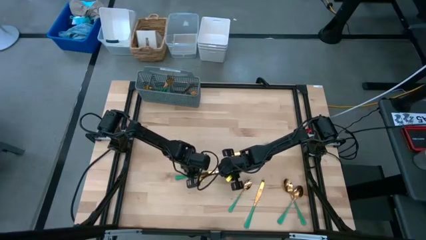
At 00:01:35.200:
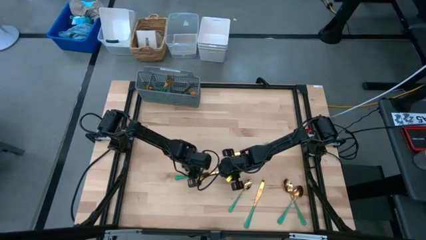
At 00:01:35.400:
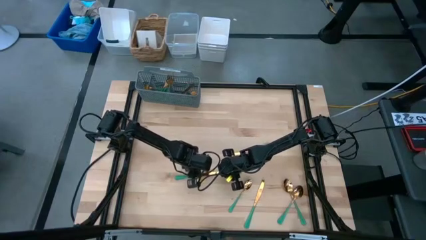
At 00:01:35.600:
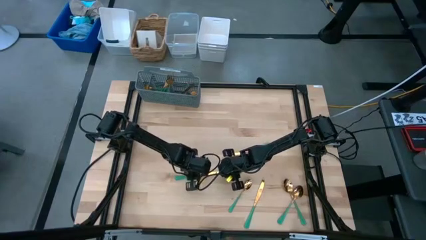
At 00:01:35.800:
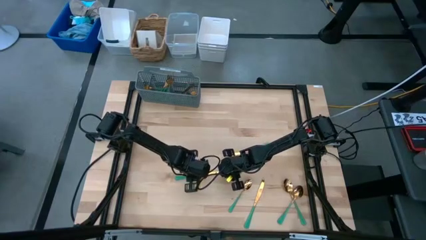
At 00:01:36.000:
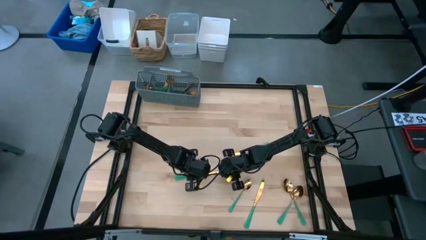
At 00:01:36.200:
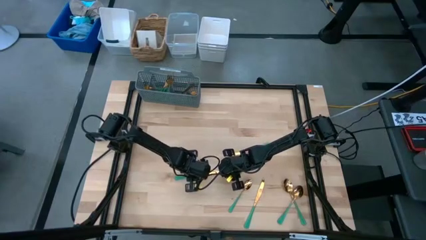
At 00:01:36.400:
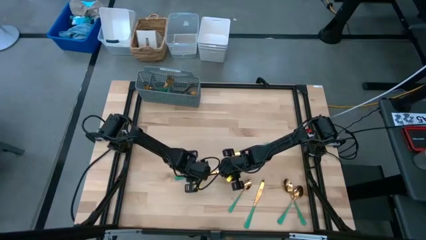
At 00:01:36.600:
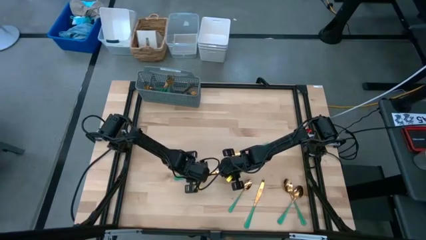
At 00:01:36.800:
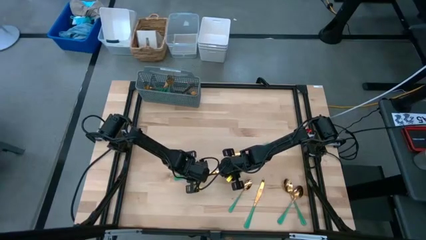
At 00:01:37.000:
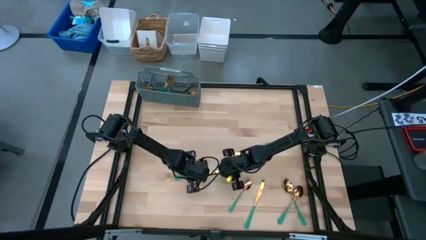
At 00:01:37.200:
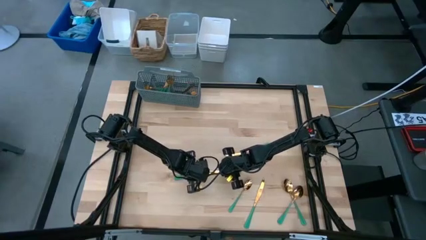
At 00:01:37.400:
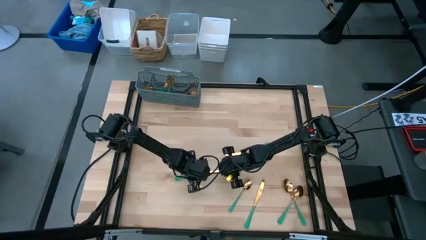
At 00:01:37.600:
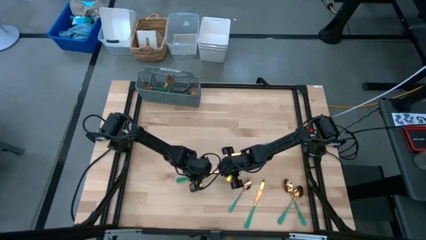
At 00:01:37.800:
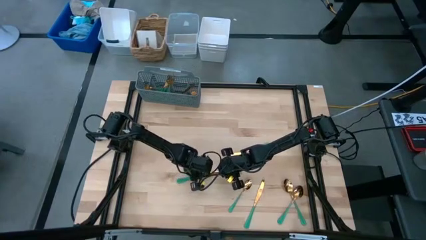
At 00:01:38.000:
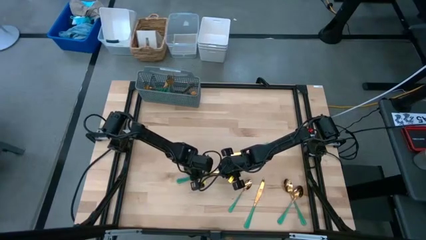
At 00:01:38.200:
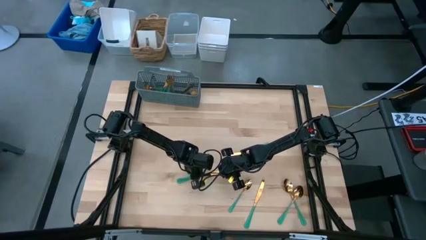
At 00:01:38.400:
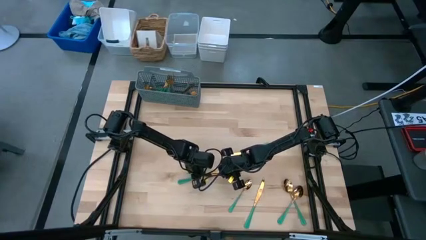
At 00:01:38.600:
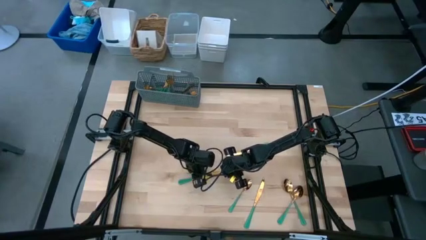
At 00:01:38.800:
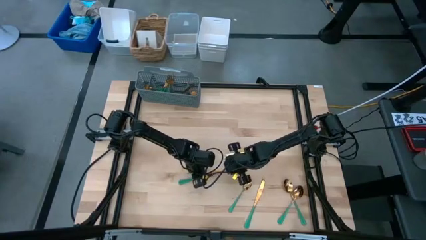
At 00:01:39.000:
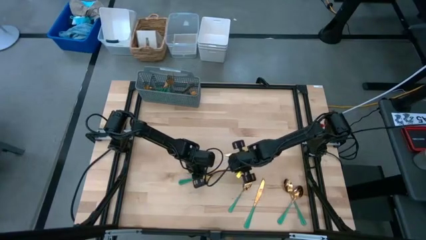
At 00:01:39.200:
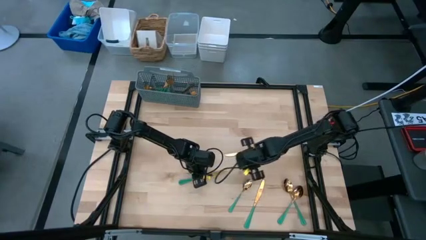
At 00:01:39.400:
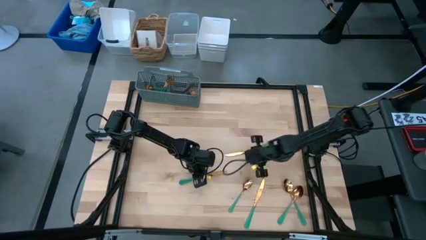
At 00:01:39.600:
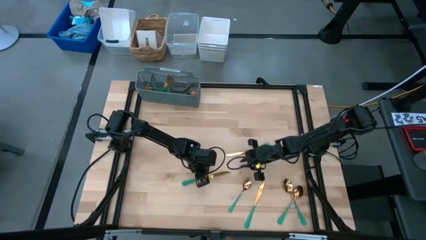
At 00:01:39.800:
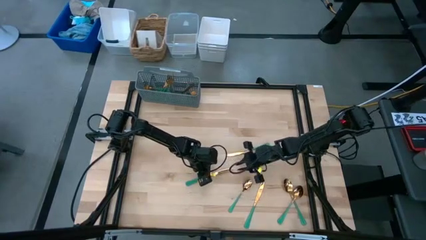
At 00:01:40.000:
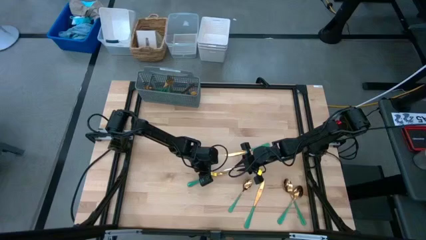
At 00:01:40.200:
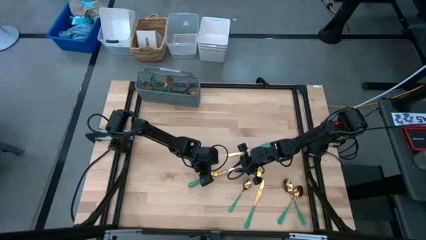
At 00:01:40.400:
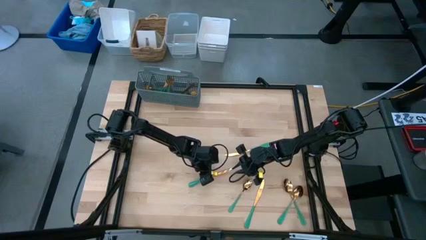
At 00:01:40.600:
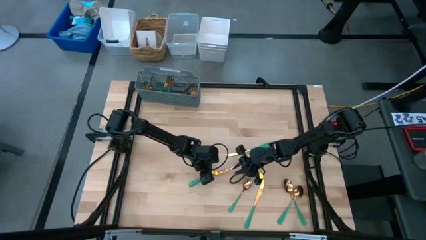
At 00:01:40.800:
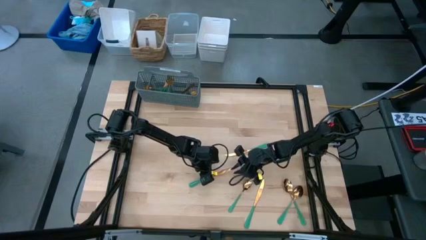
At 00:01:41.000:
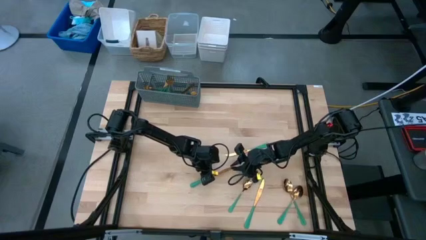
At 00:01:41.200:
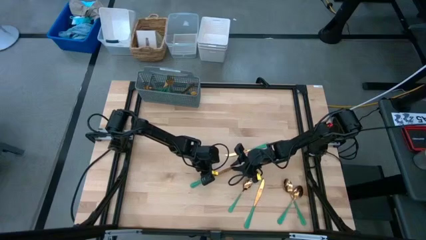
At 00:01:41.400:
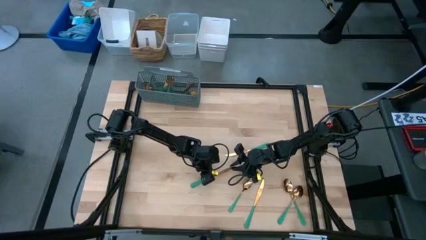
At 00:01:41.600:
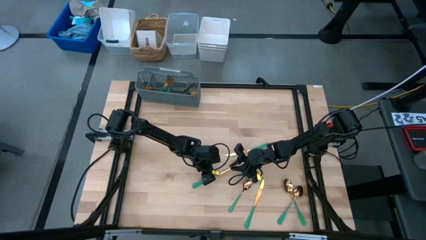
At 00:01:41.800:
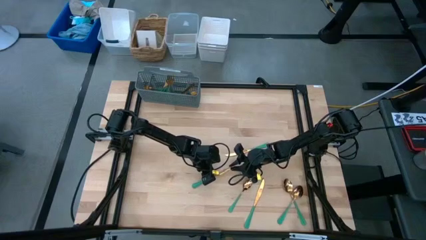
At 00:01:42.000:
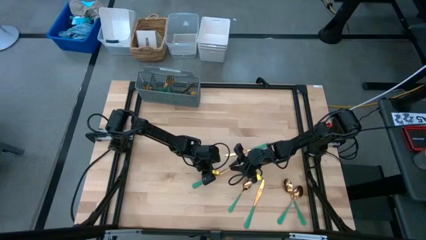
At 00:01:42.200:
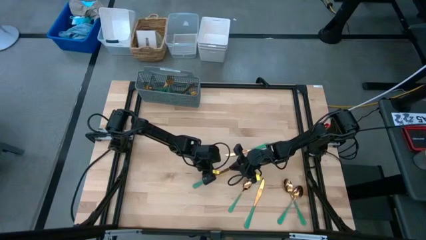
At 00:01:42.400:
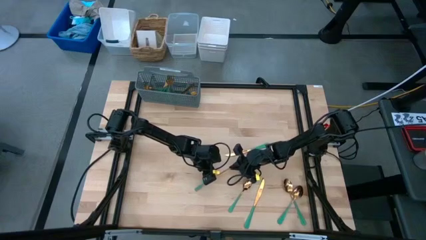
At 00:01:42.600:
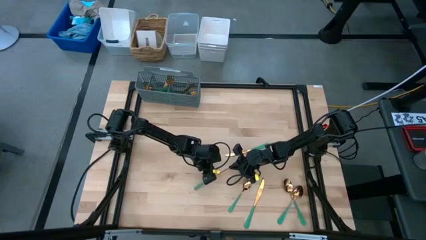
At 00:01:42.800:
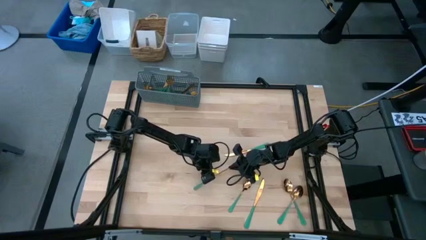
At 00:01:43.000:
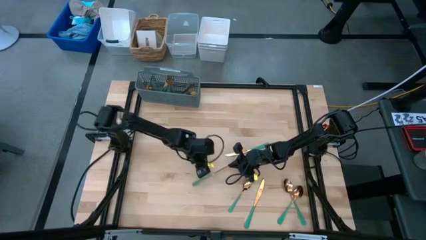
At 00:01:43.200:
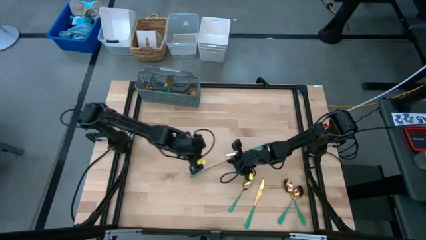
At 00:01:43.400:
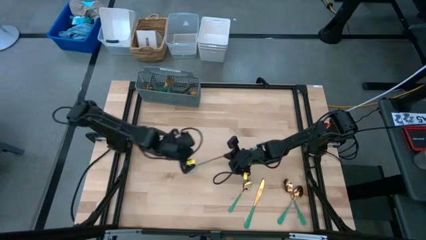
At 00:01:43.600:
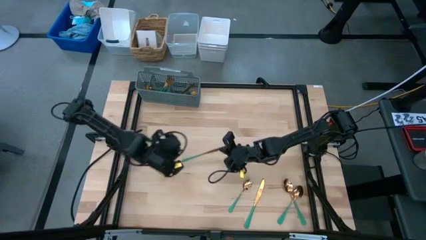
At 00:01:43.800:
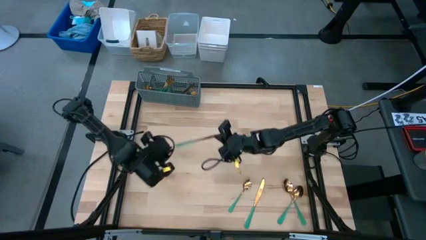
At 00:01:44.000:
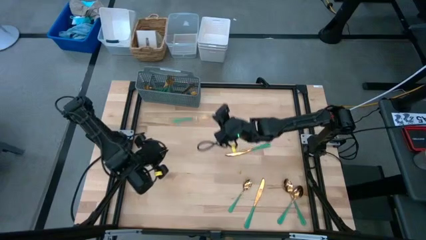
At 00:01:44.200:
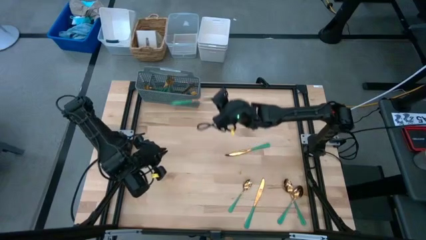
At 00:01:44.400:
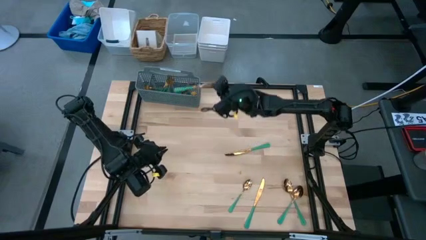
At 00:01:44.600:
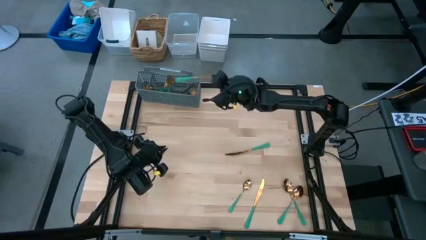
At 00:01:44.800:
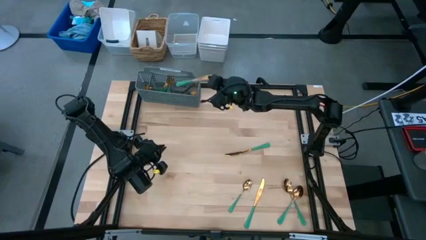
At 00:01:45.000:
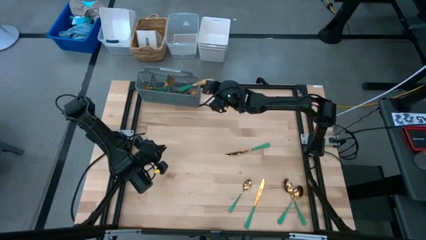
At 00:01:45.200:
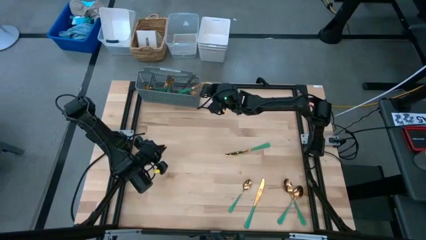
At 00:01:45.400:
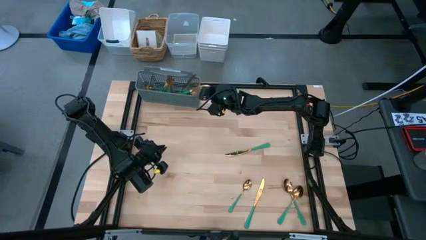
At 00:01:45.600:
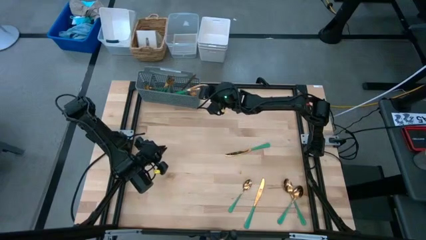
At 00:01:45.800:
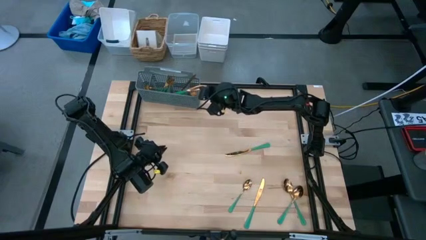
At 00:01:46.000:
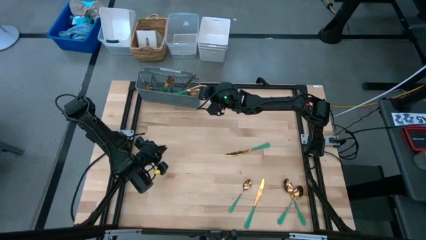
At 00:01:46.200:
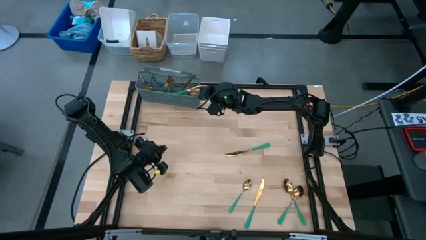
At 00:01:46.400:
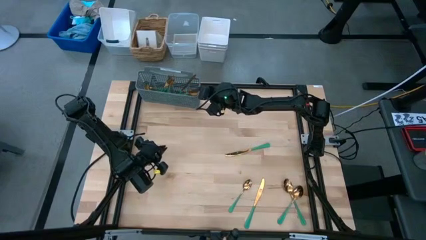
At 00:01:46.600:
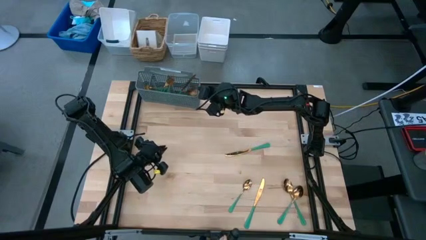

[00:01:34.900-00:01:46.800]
Task: Sort silverware
Put the green knife into the gray silverware basket

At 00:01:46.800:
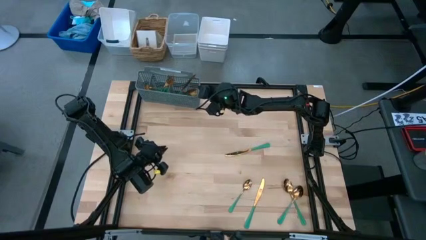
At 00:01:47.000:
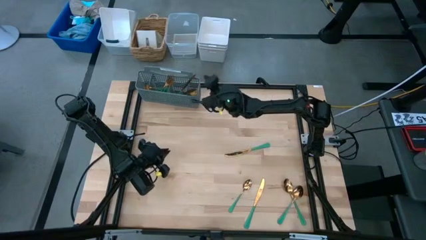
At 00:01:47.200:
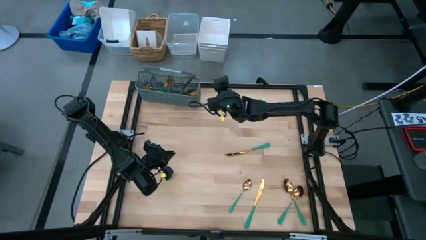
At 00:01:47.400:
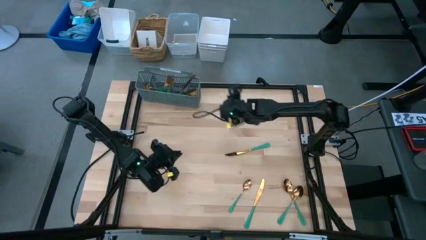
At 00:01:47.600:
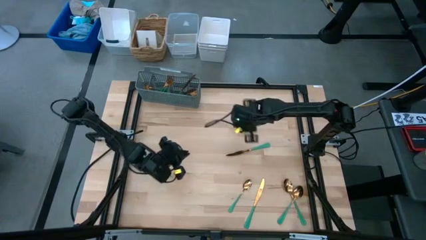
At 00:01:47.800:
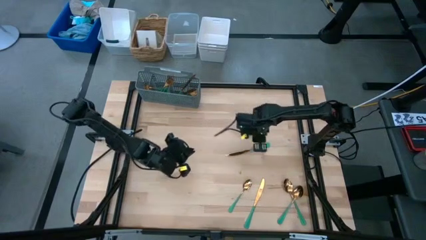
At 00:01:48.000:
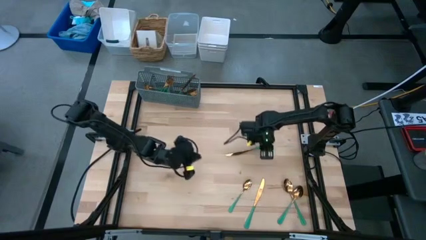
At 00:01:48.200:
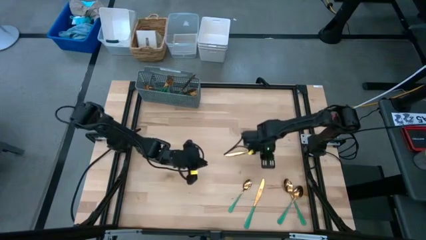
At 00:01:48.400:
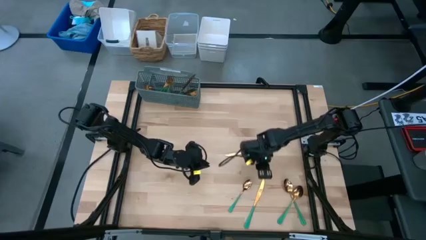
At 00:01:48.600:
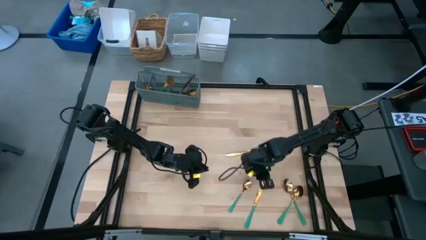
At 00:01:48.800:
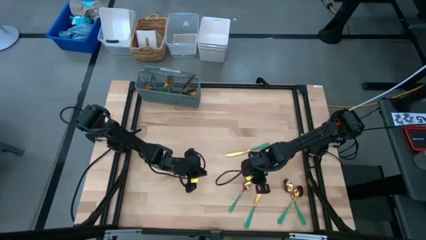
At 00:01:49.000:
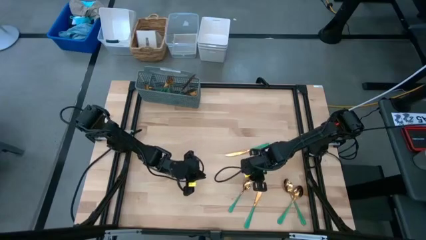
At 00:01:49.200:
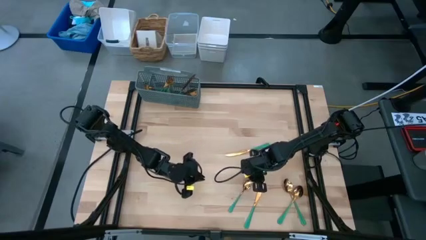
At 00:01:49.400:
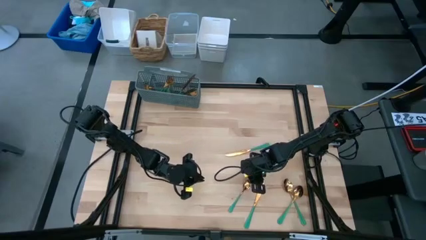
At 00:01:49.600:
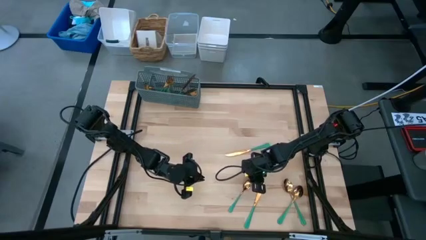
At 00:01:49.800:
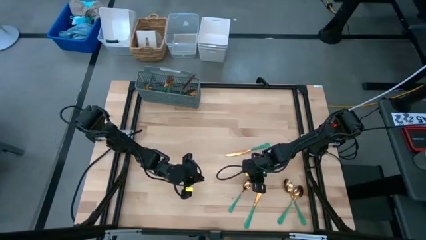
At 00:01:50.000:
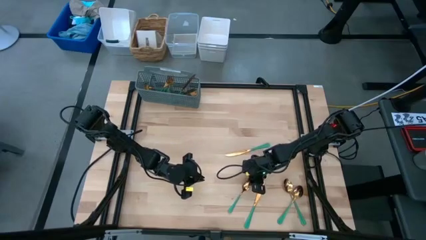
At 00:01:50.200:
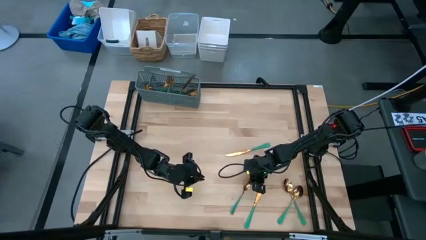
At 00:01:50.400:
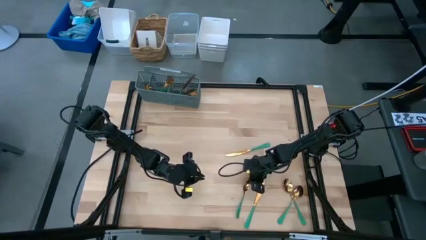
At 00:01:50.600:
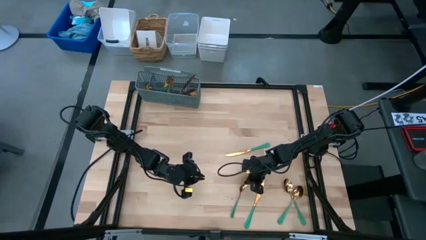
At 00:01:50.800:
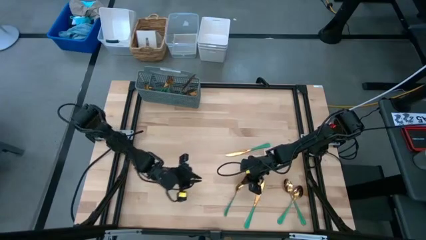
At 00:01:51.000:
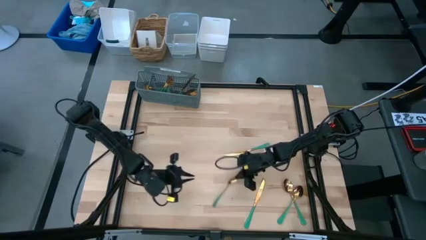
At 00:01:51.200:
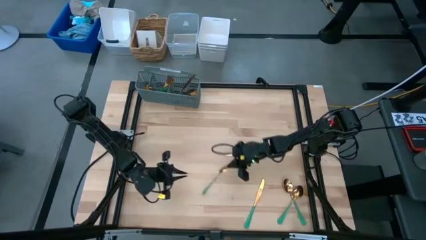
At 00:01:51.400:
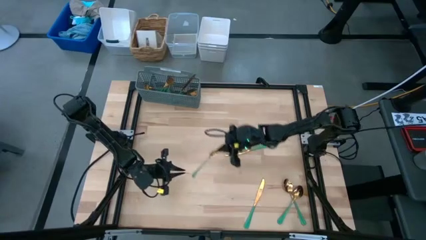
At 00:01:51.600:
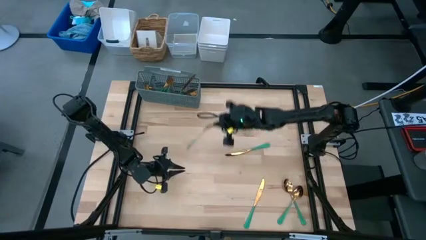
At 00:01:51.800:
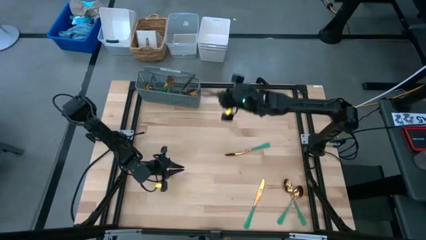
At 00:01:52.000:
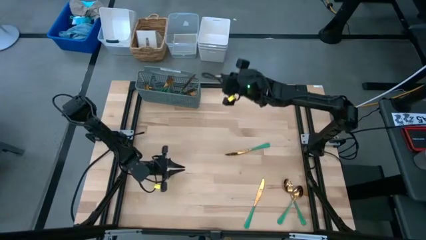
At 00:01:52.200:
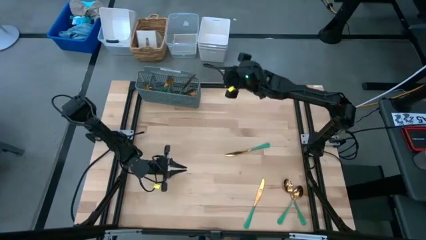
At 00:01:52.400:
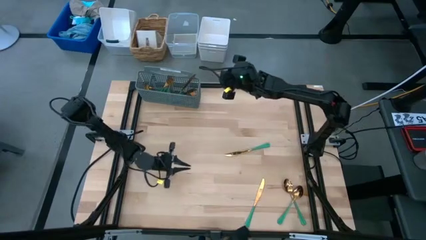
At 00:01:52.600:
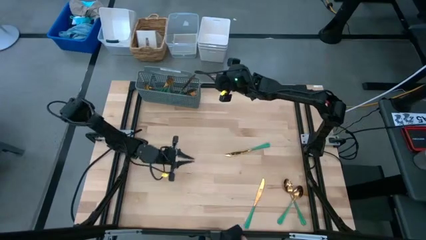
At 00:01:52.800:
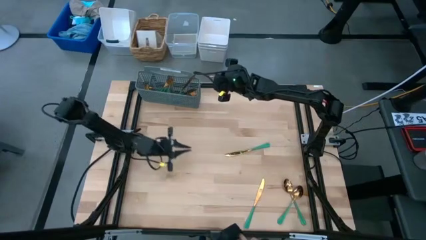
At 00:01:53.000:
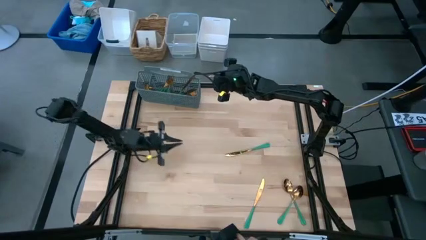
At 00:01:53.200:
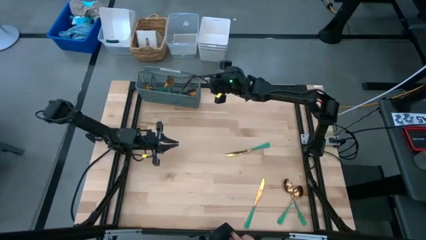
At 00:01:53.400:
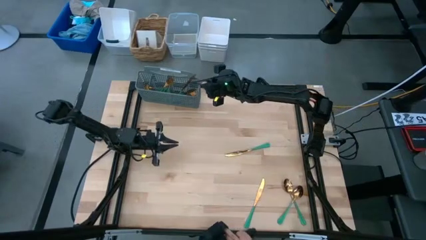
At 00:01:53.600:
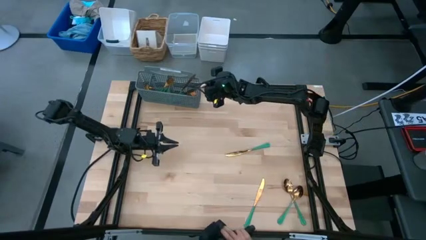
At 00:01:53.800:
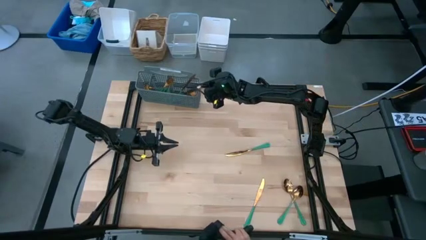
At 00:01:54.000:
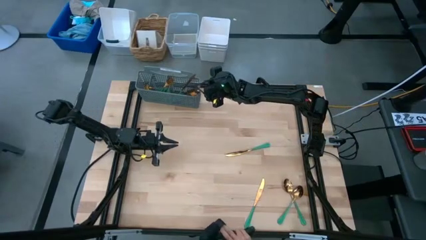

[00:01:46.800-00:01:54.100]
Put the green spoon into the gray silverware basket
